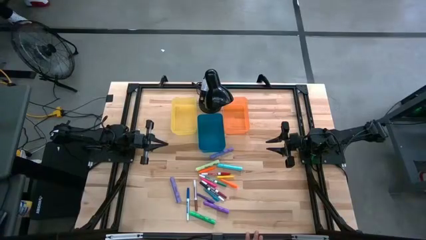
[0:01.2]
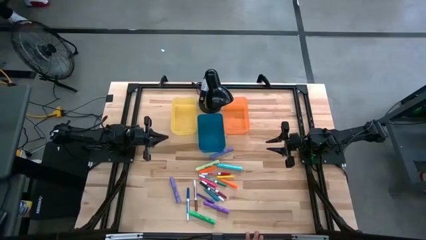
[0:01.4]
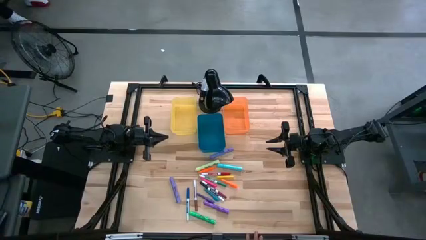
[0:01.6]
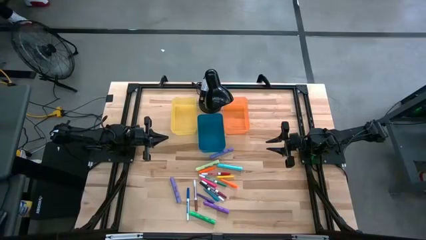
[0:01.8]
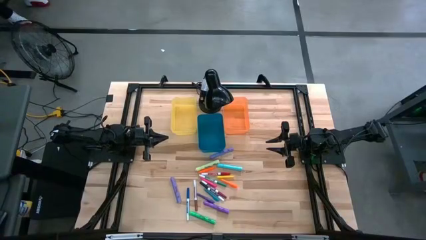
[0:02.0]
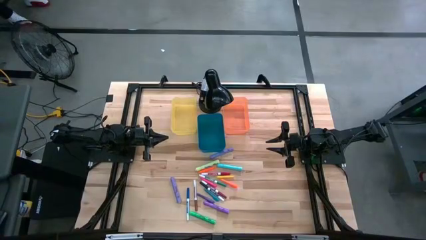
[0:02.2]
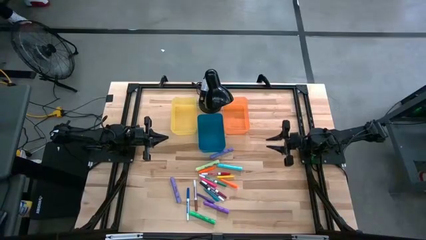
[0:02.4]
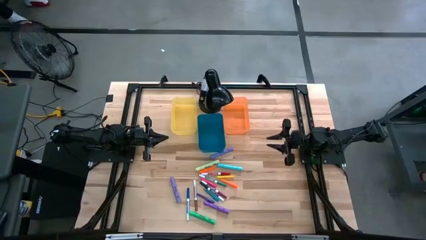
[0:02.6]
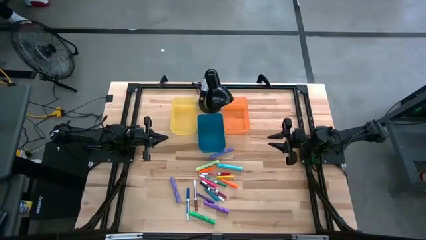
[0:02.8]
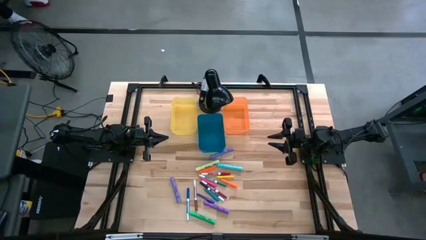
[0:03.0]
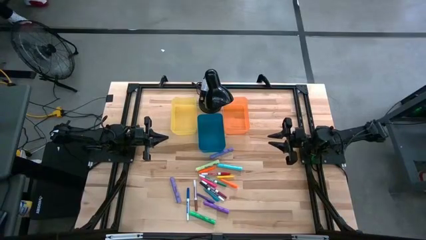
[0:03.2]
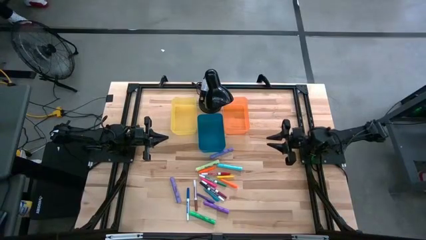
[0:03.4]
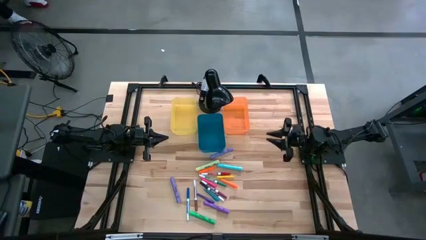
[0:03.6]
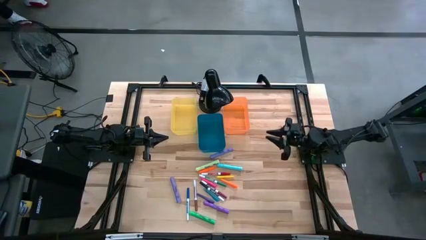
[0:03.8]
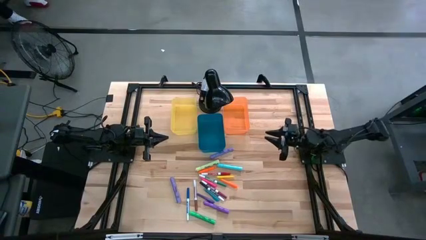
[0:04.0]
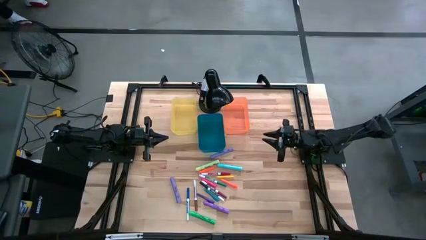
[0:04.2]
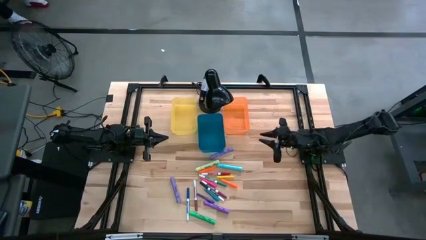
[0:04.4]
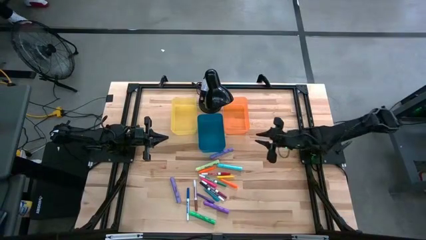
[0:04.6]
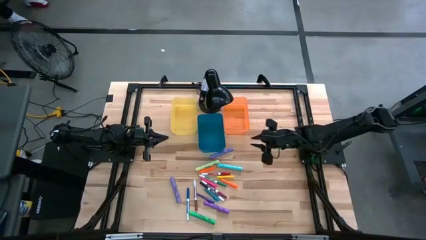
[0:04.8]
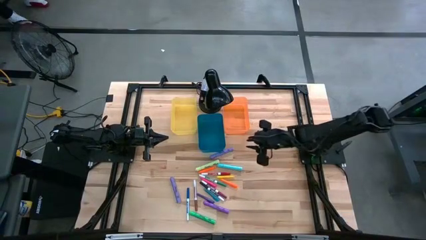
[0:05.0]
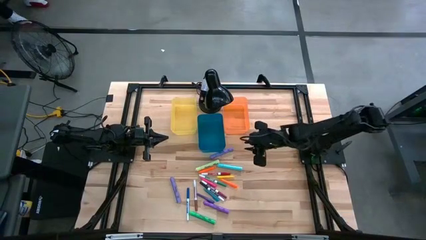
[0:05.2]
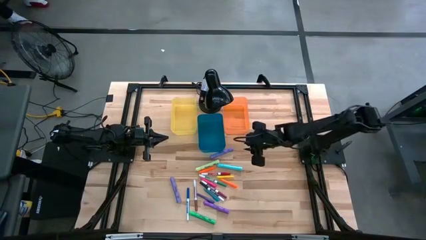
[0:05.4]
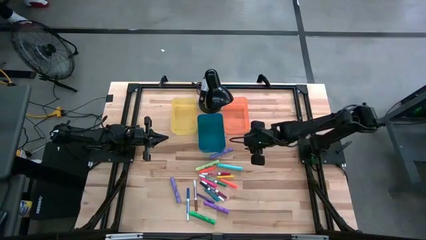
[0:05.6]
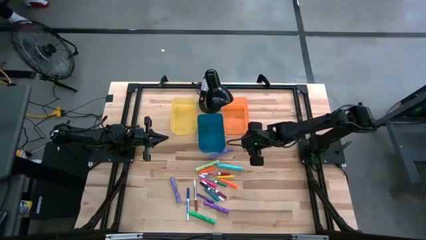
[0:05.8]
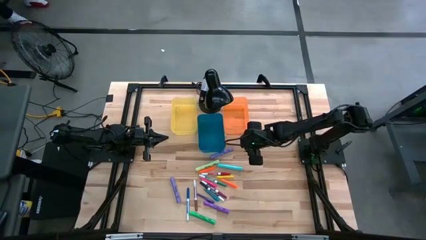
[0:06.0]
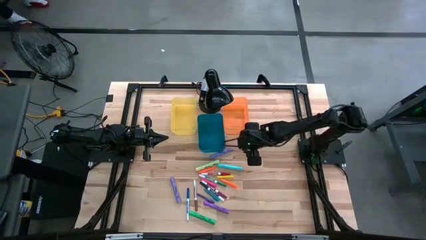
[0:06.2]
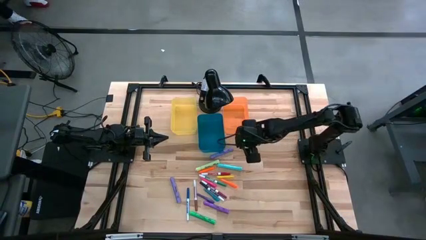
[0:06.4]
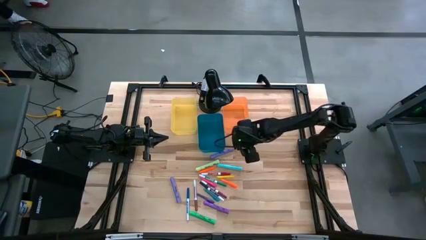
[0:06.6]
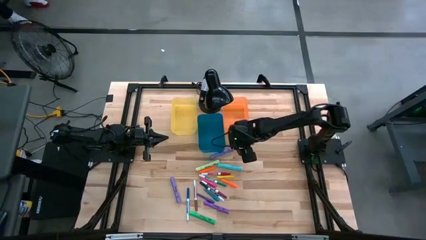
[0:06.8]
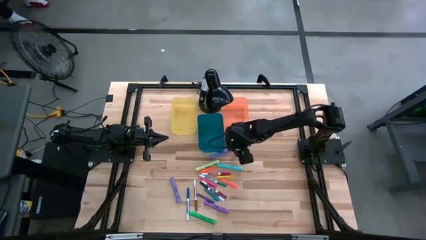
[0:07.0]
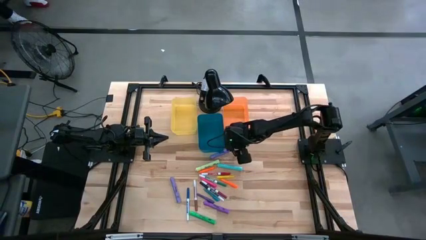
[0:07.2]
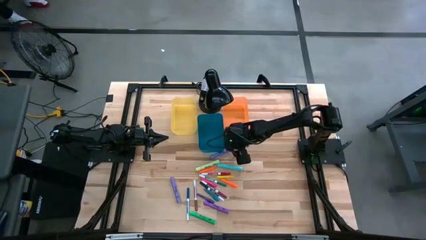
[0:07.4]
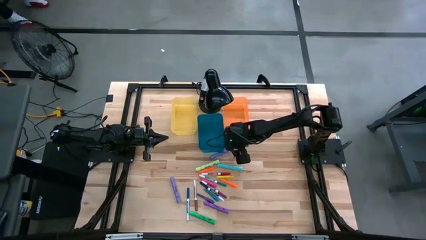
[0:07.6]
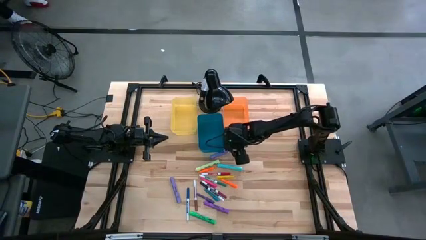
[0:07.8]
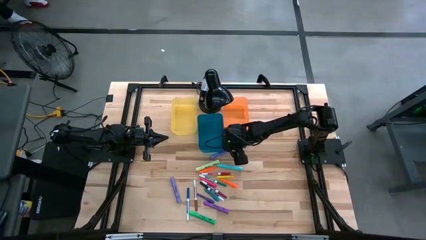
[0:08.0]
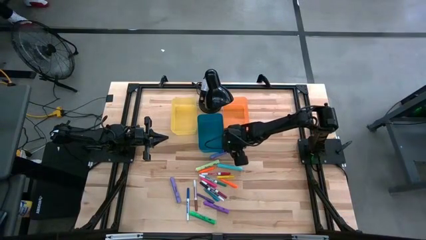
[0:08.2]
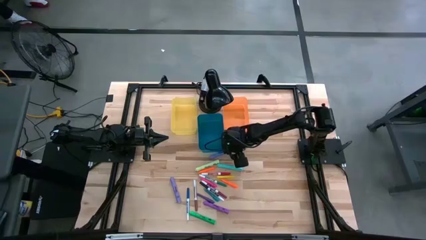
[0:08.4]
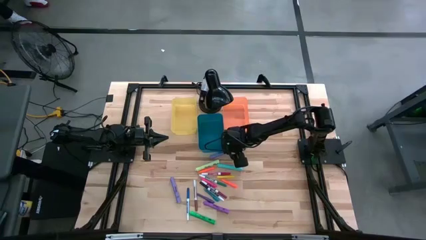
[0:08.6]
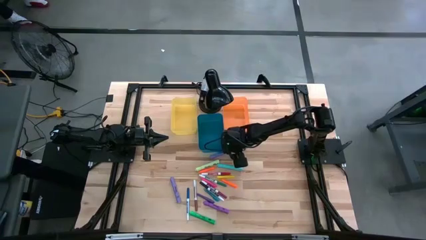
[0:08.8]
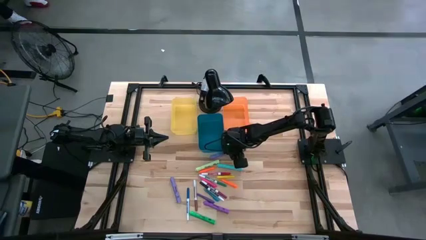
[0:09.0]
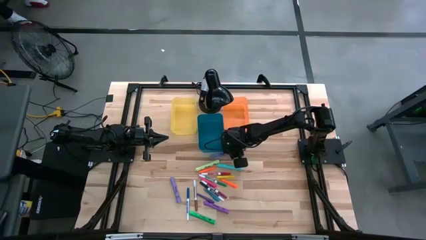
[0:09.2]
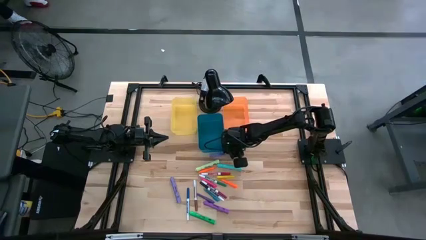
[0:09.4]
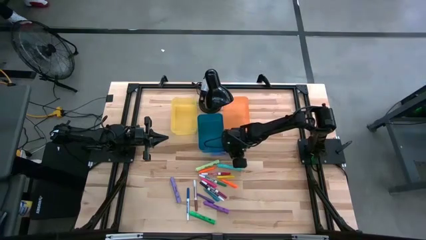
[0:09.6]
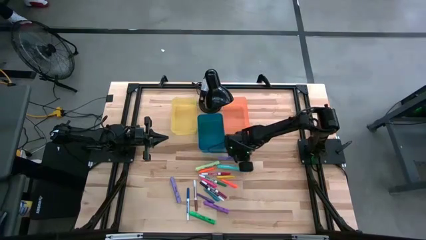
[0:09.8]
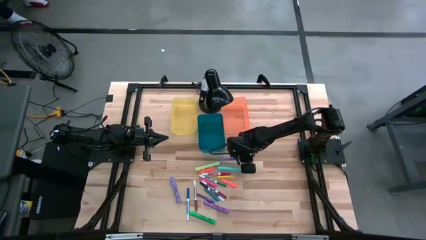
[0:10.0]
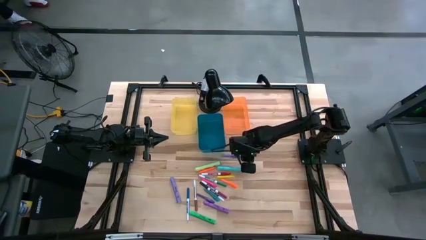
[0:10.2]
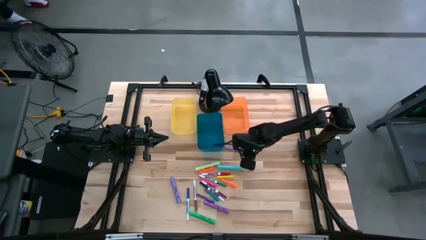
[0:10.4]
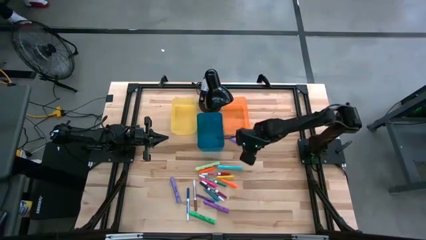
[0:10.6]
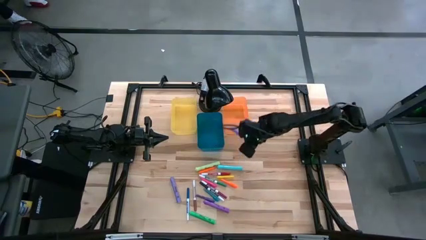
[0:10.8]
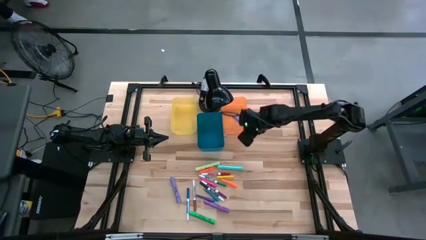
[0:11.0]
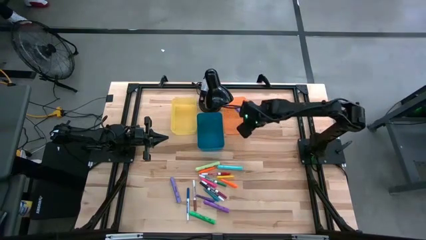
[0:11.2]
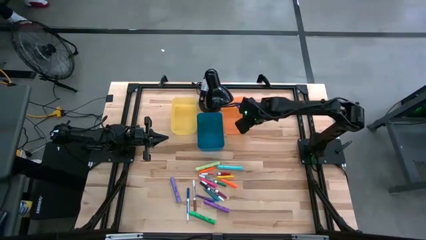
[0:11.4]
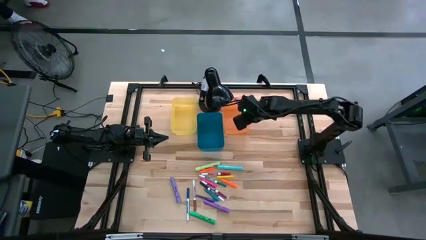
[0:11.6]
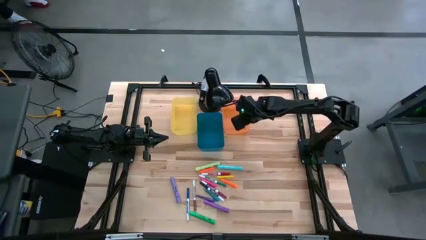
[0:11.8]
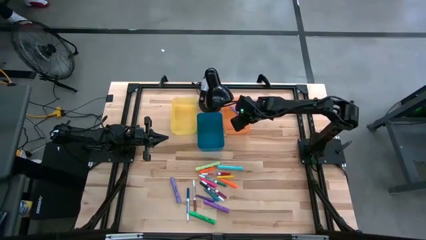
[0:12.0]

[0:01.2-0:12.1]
Task: Pick & Place Markers
Put the top violet highlighter into the orange bin

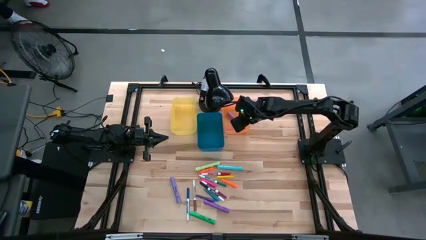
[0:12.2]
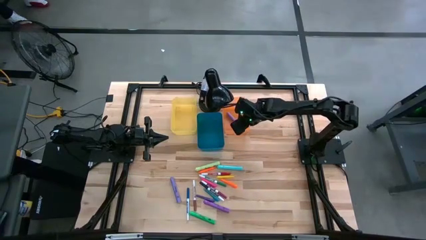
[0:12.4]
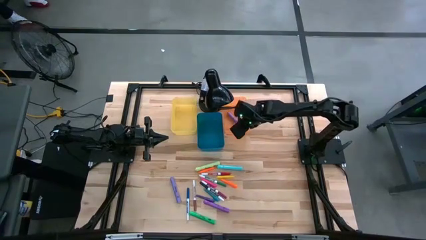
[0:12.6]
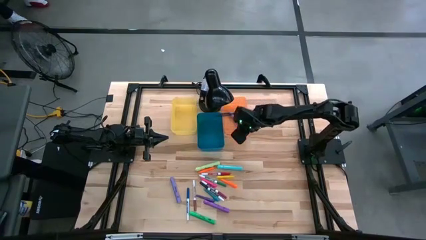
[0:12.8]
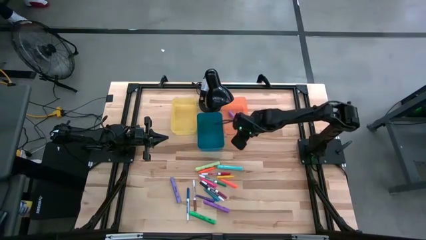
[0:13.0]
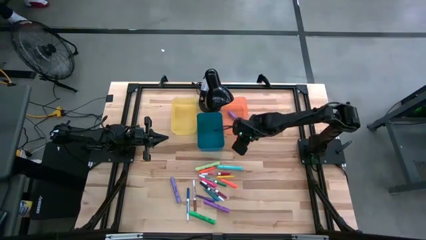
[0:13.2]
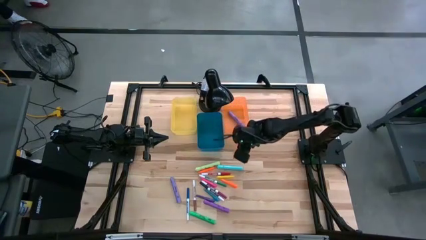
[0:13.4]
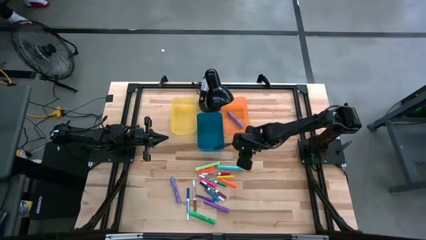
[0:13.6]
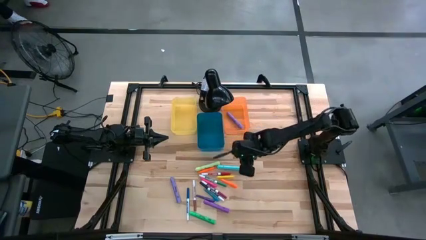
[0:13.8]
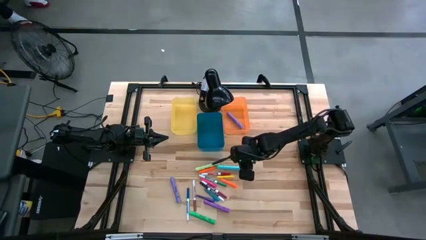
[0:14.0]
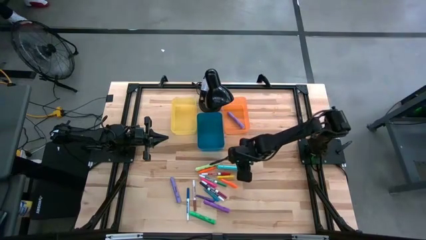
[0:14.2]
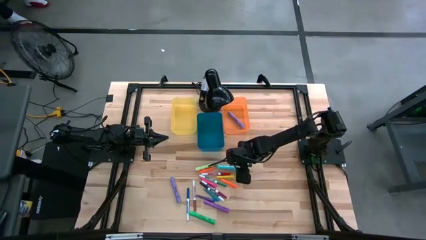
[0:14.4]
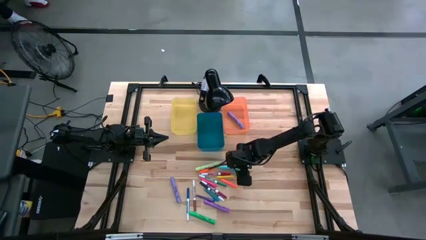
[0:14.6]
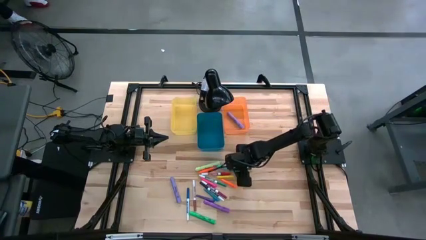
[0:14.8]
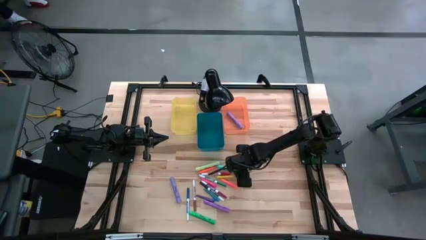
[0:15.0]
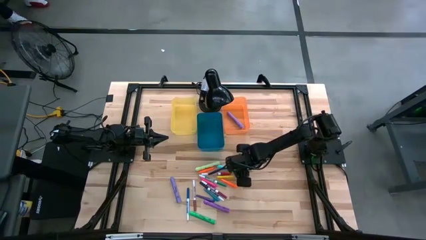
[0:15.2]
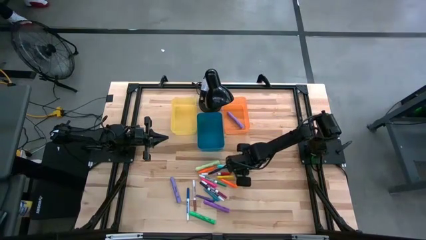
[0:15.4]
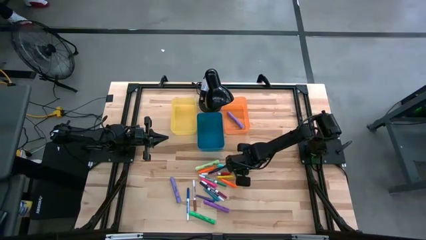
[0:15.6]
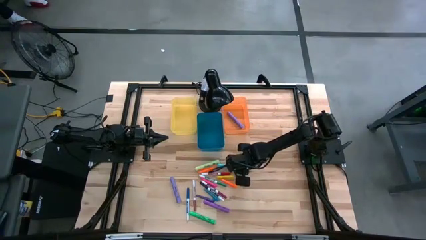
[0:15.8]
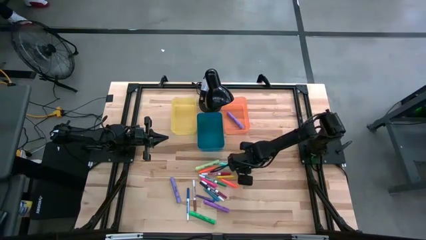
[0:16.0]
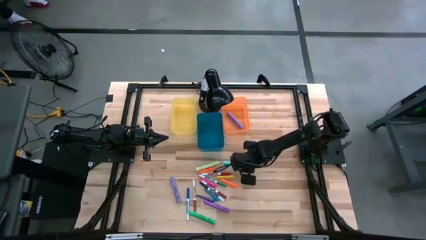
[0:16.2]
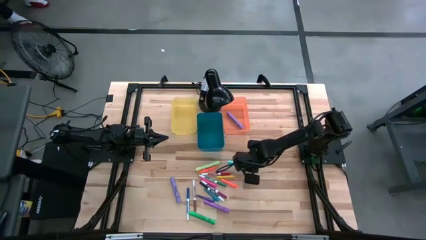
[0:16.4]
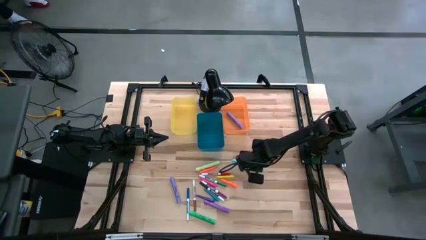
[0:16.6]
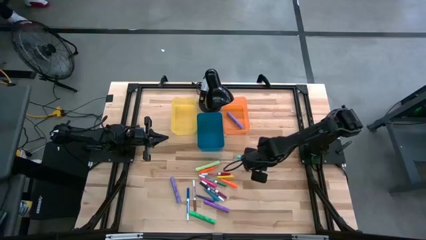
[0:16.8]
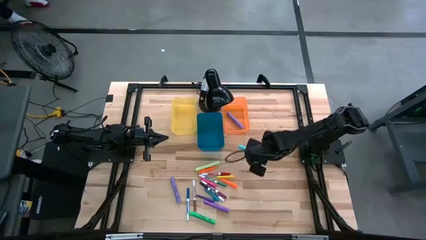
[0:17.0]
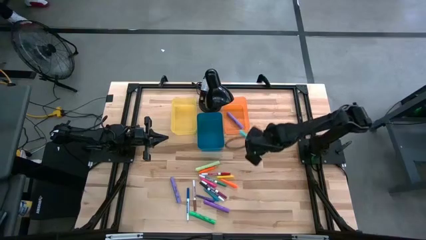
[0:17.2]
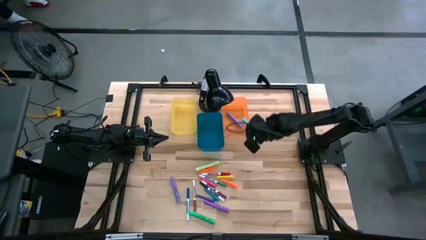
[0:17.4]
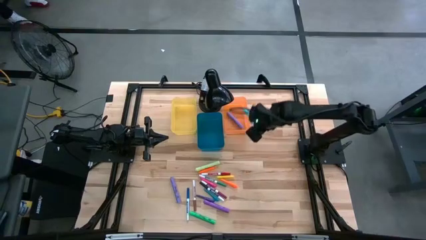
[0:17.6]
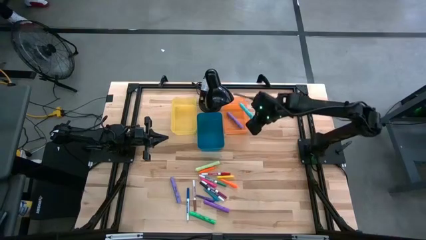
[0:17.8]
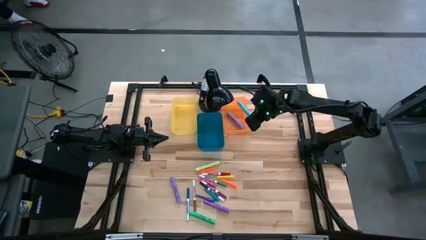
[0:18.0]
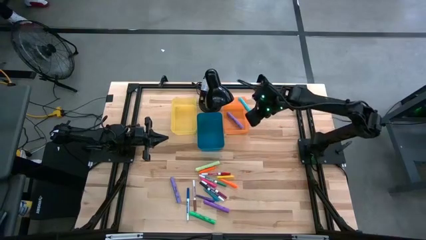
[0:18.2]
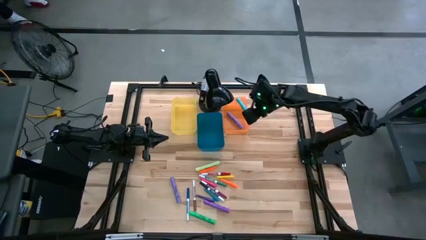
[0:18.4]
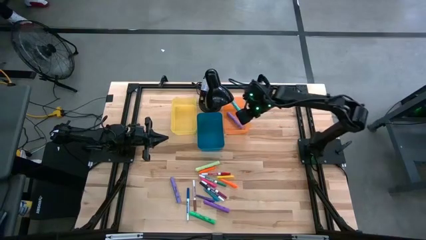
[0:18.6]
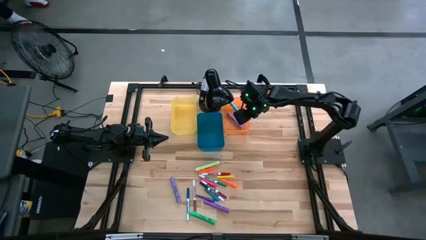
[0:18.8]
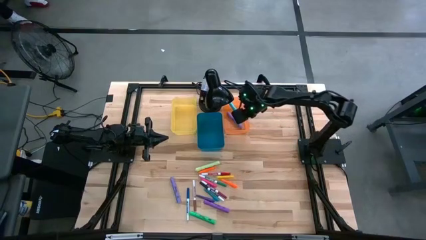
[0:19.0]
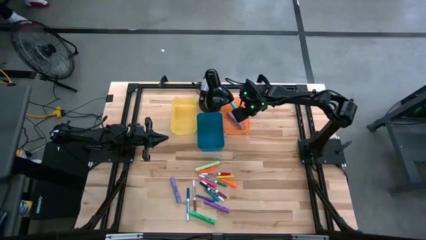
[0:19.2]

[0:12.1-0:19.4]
Put the light blue highlighter into the orange bin
